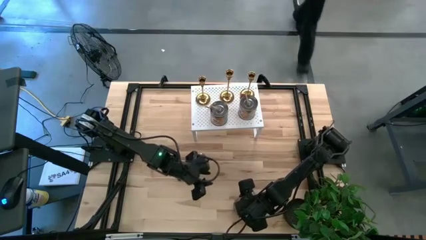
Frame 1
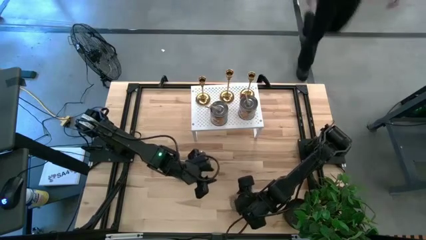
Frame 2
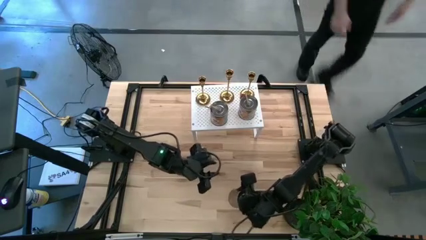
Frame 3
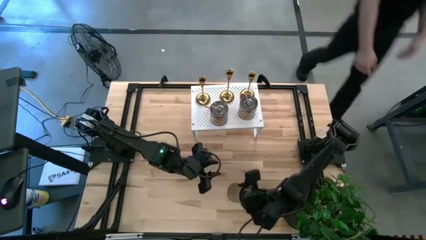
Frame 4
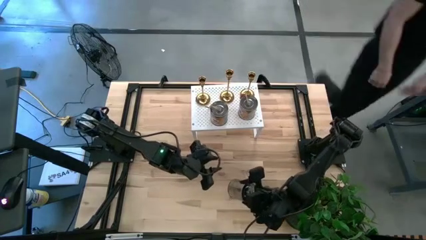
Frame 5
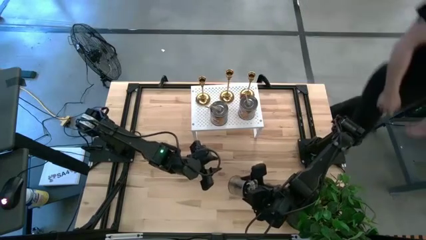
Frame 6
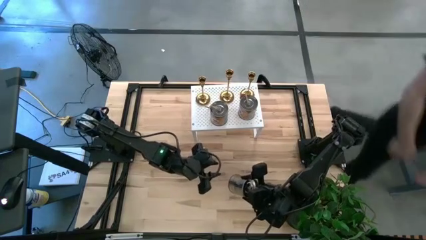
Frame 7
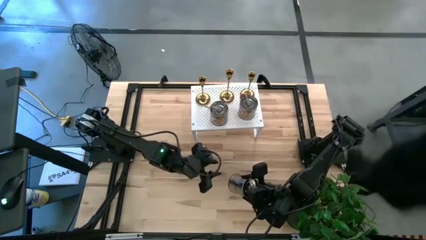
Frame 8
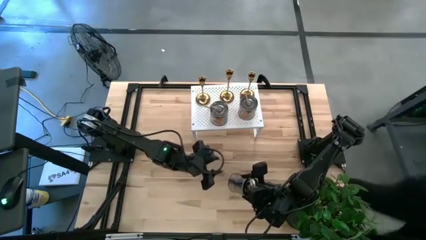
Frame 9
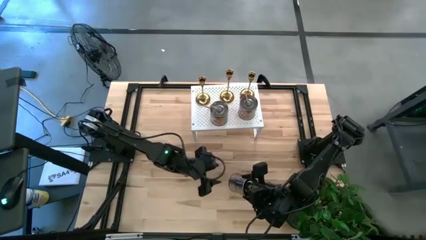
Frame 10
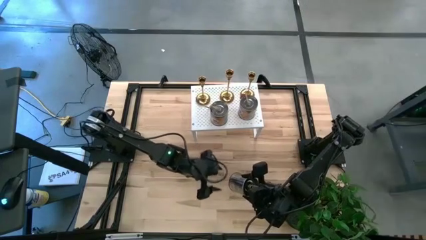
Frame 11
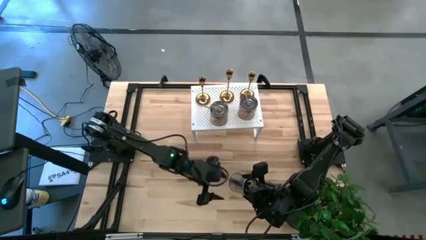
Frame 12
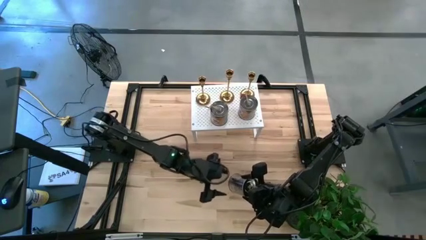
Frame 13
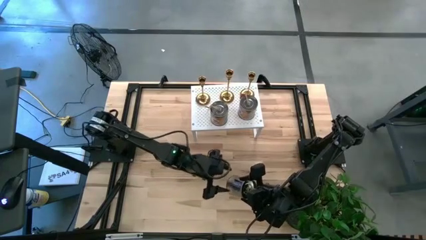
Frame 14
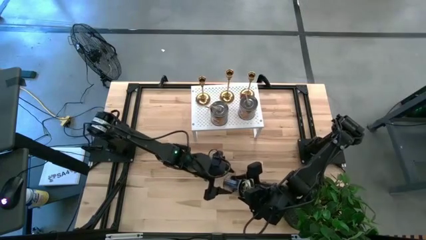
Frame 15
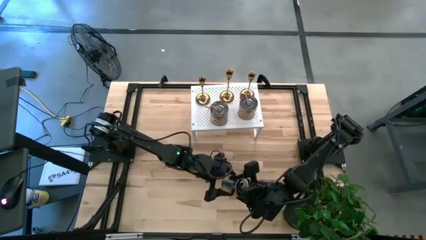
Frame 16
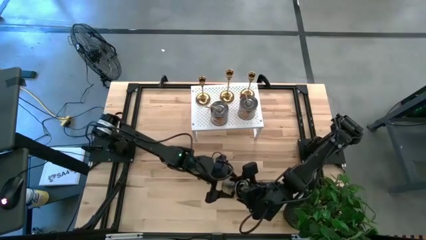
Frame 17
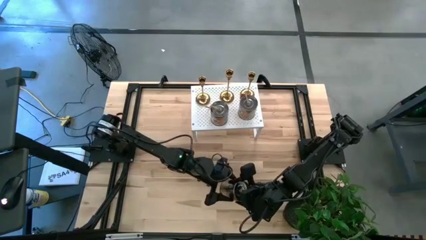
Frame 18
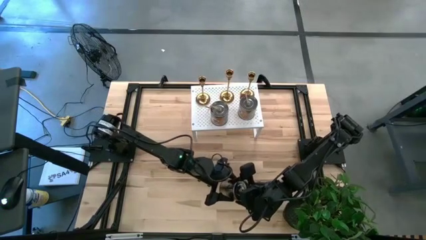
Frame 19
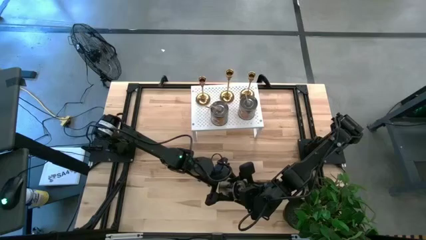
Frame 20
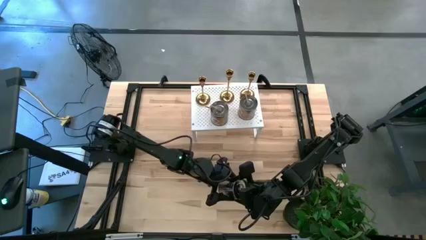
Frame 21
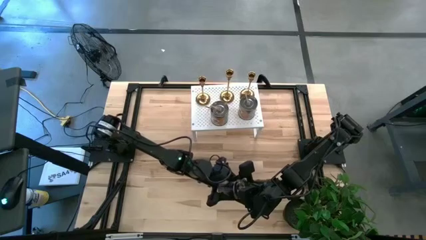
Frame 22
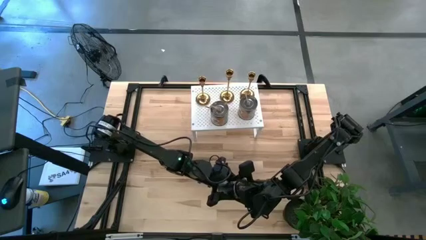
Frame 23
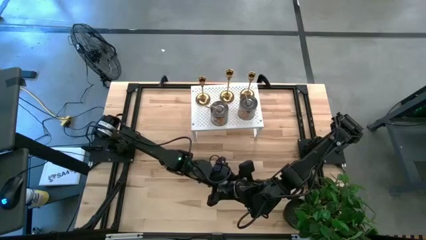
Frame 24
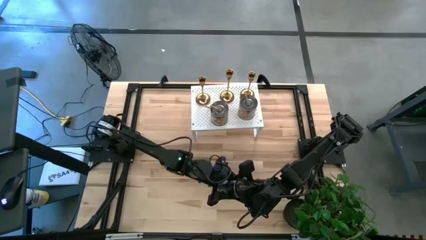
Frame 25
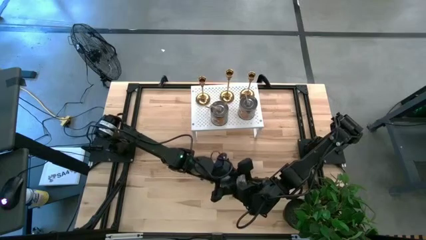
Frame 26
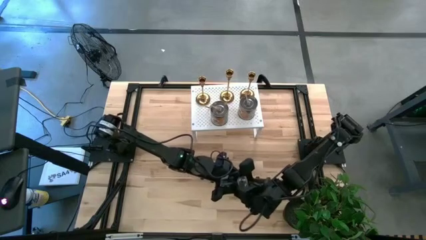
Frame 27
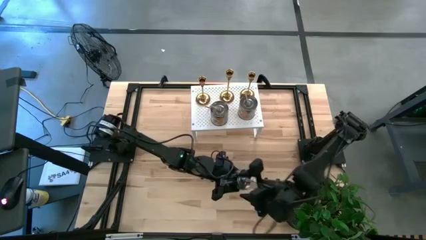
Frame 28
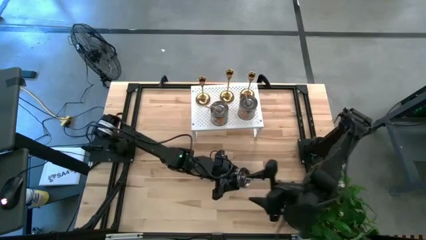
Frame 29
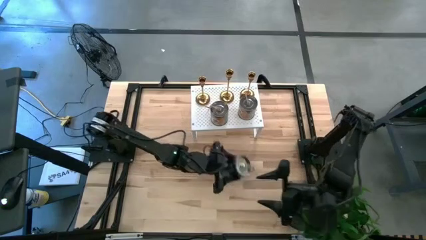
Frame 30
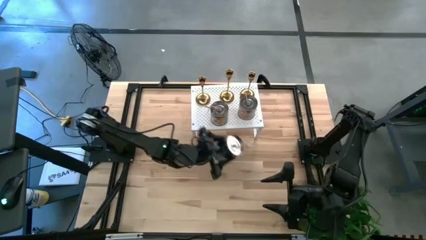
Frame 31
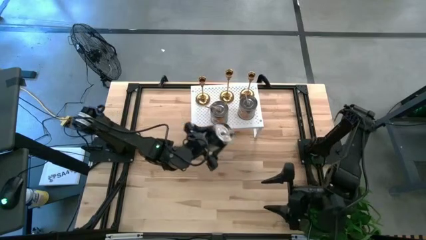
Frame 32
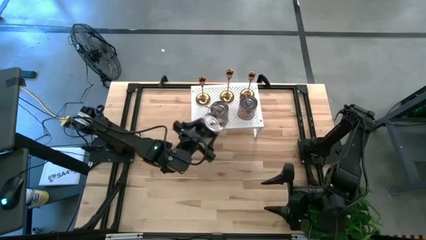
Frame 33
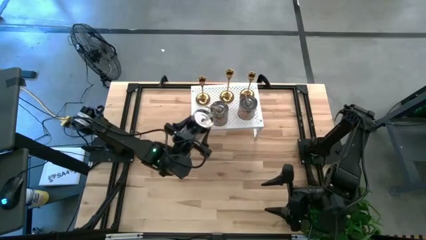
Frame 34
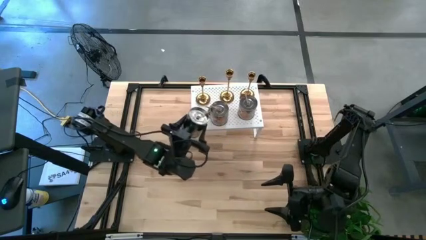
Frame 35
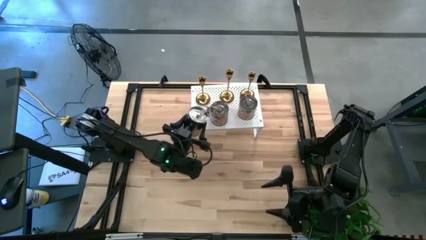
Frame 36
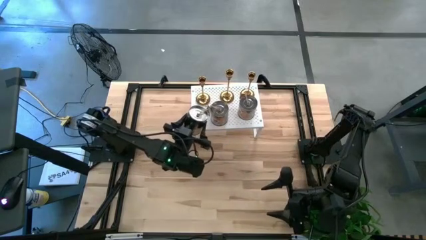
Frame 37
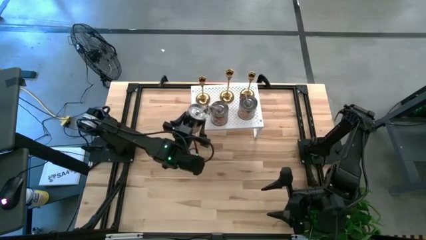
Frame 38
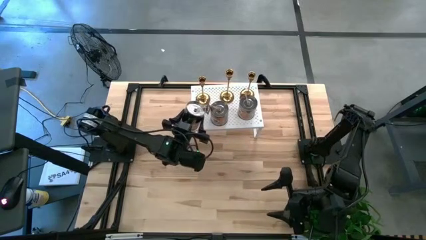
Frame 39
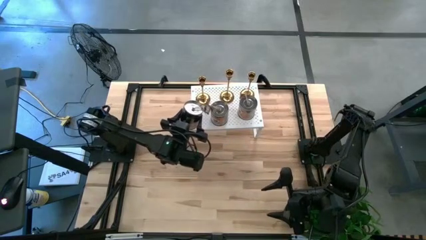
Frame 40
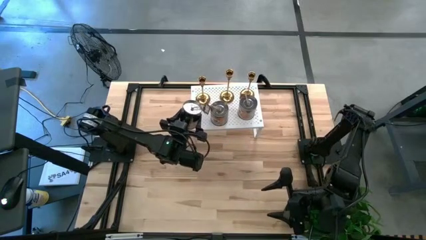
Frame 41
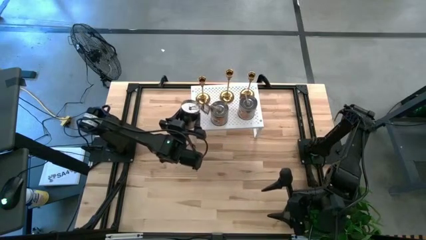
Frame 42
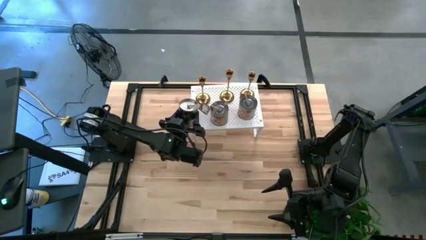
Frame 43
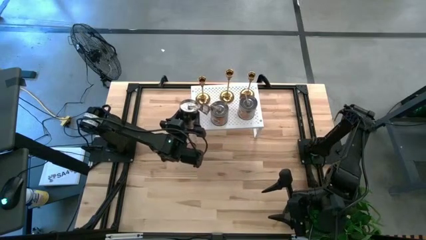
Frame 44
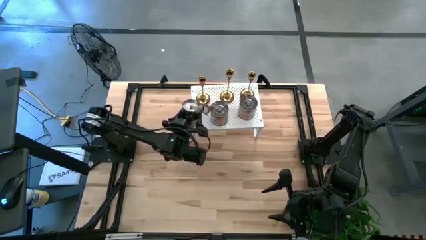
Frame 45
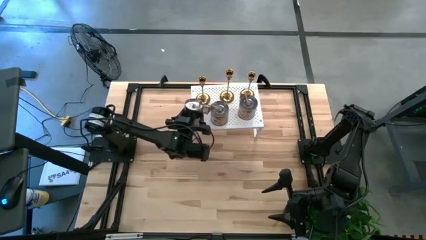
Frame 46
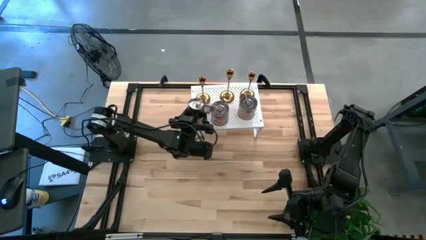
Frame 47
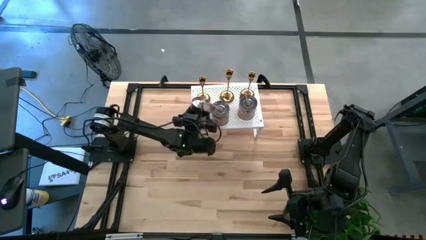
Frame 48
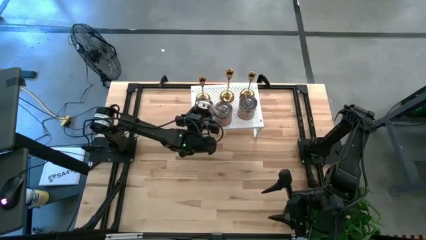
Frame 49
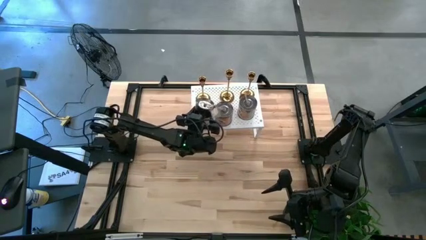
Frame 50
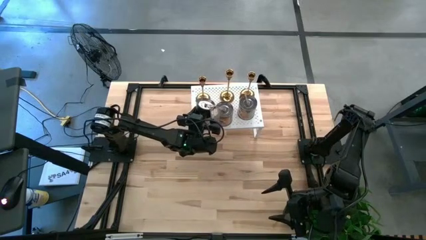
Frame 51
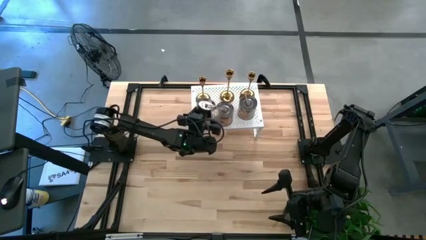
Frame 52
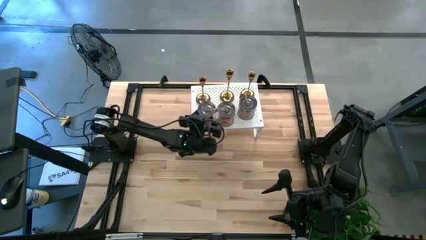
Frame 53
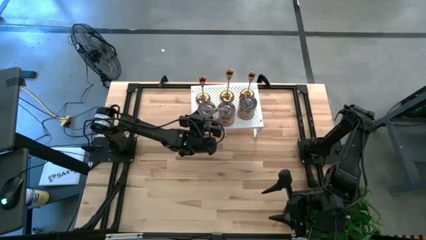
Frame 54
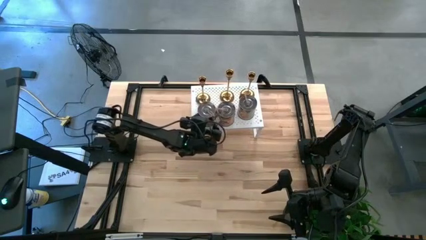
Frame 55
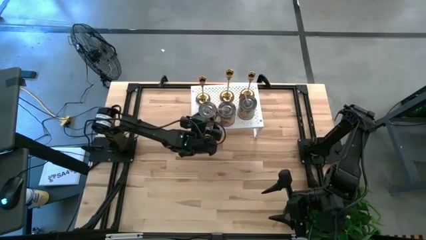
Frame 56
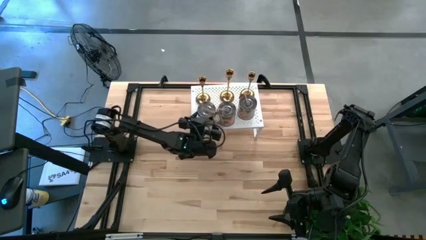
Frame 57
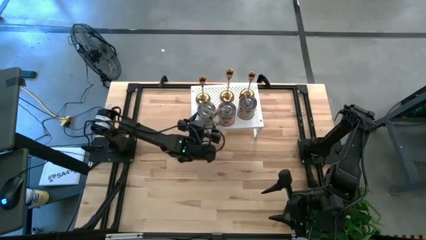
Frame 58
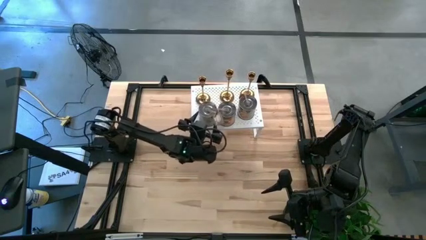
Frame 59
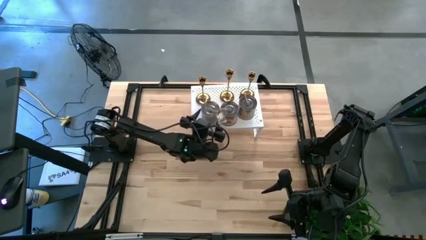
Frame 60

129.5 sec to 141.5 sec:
Task: Pick & Place candle stick holders
Put the silver candle on the shelf aligned with the gold candle holder

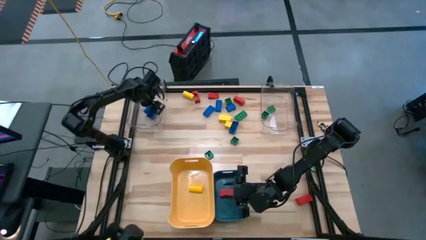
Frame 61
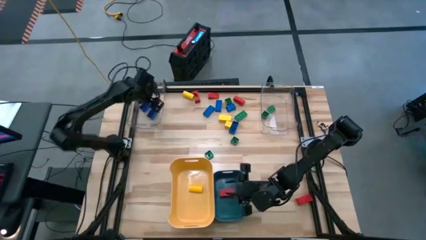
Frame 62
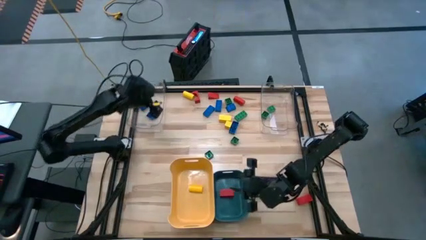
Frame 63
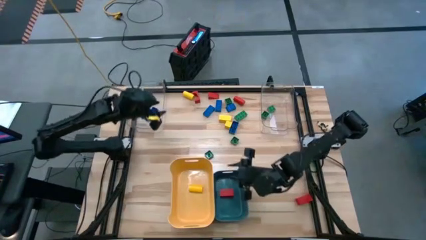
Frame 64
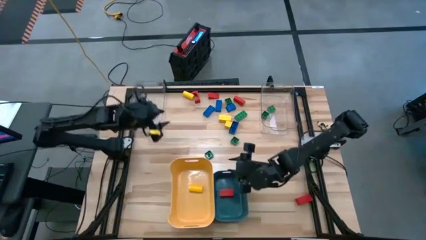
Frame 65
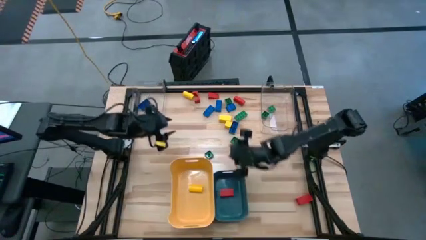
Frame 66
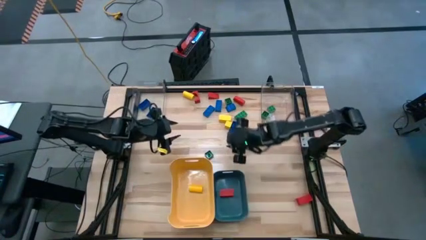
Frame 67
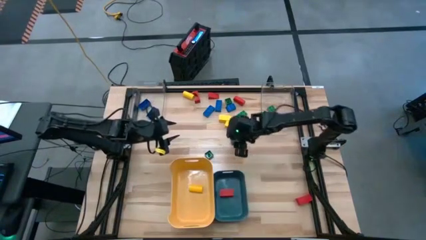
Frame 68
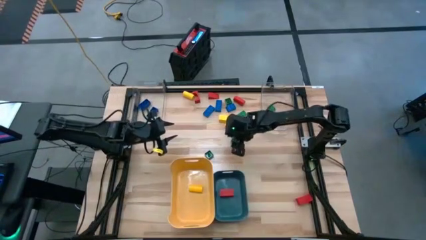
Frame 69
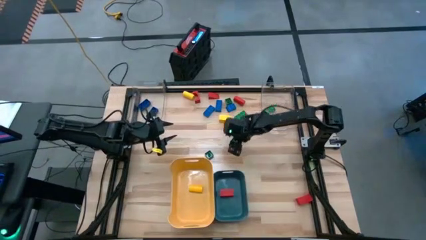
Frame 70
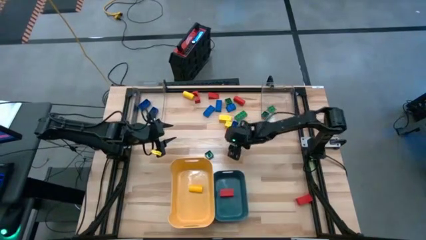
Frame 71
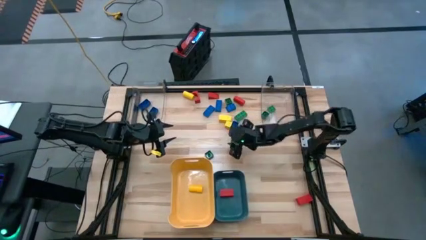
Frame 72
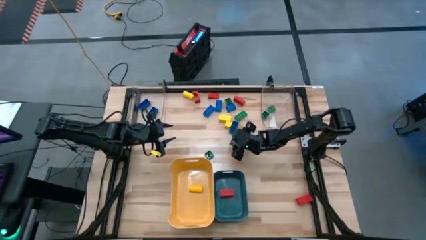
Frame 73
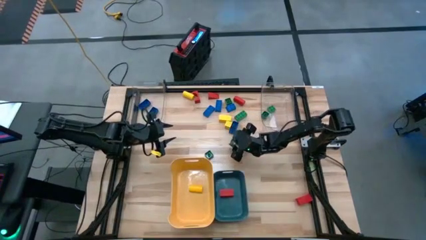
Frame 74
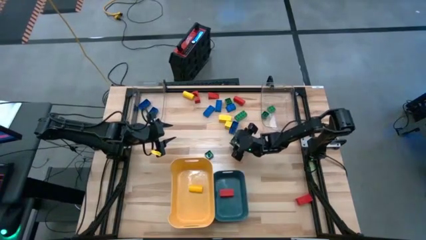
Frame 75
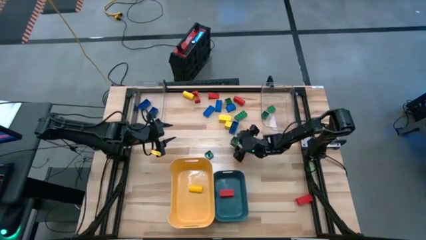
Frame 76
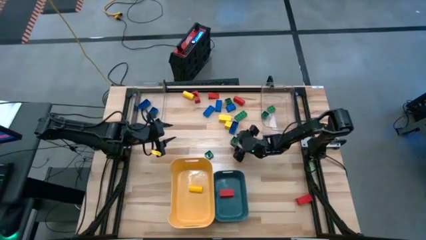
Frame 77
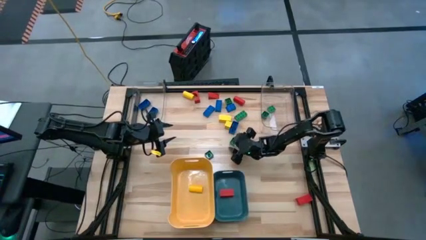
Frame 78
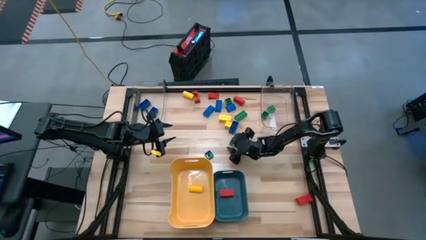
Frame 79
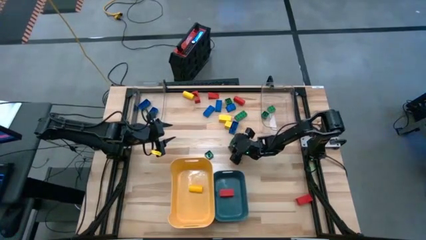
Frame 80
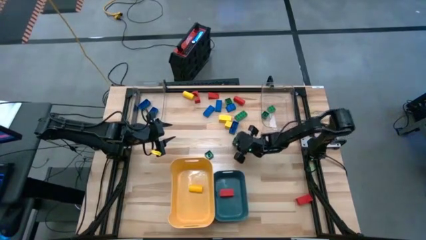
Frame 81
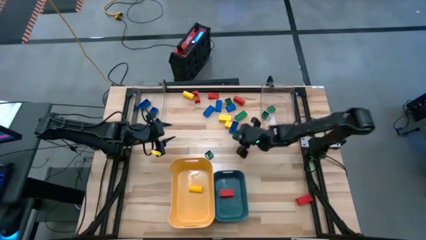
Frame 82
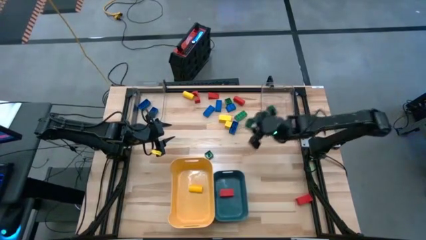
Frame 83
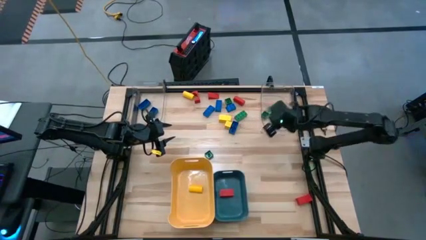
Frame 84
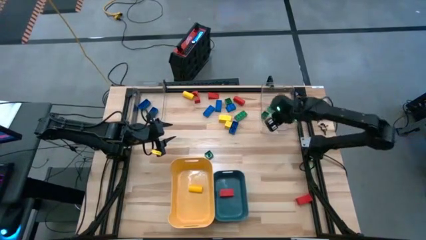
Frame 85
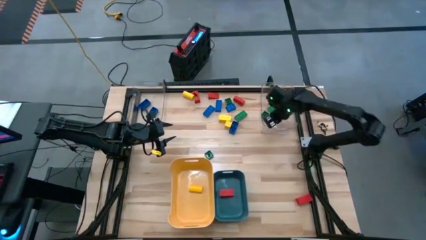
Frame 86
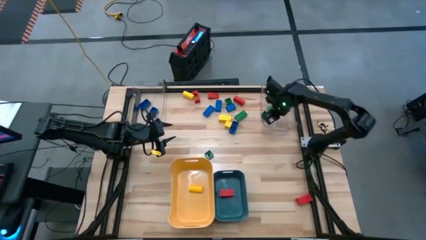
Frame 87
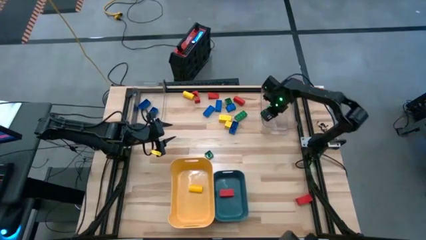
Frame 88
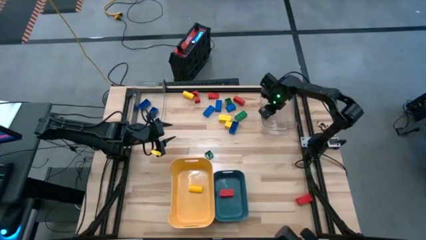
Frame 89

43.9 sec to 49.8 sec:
Task: Sort blocks
Put the green game piece into the right transparent bin
